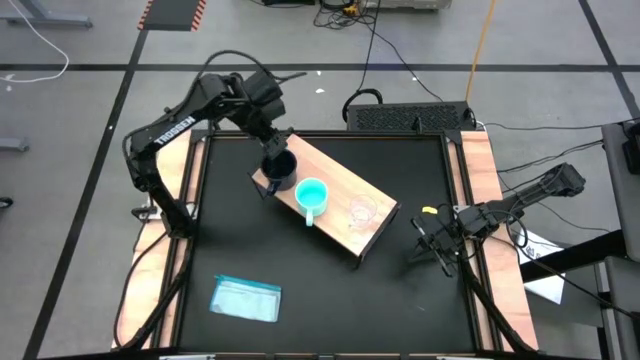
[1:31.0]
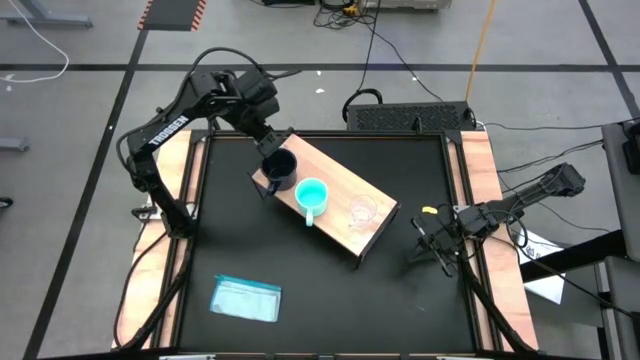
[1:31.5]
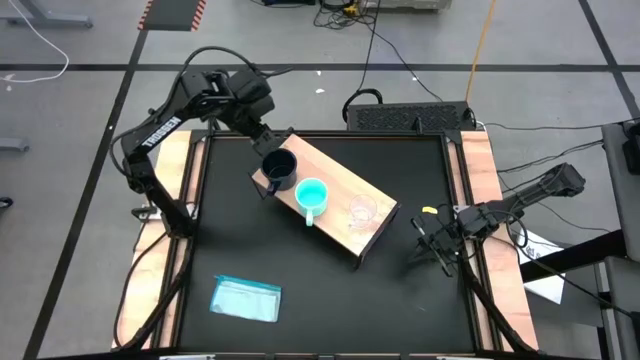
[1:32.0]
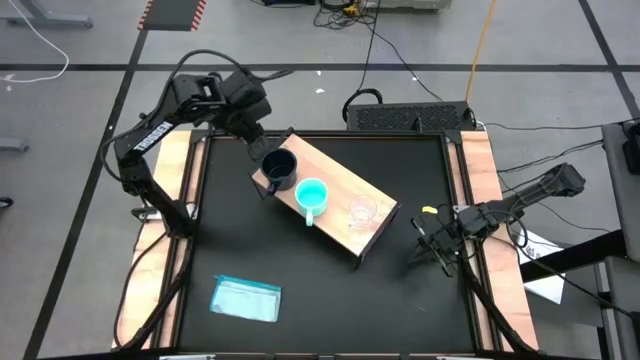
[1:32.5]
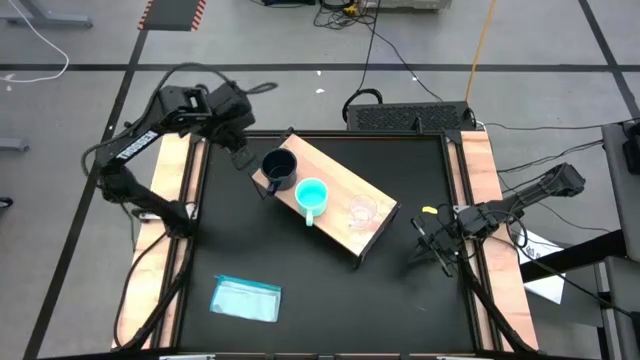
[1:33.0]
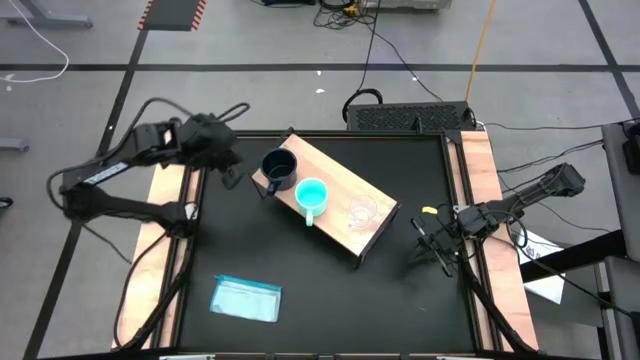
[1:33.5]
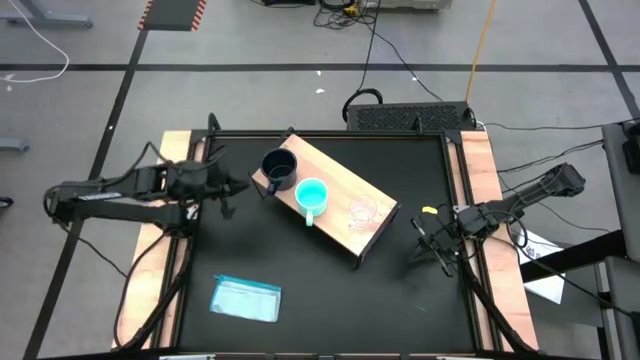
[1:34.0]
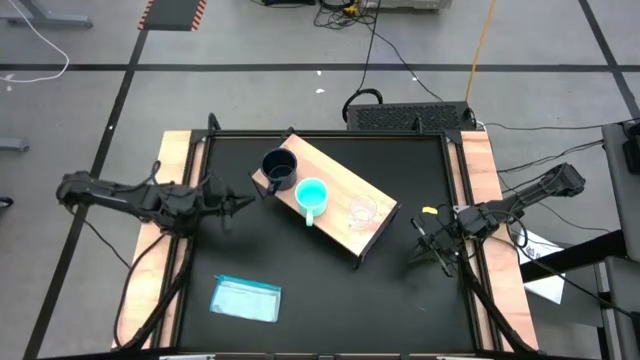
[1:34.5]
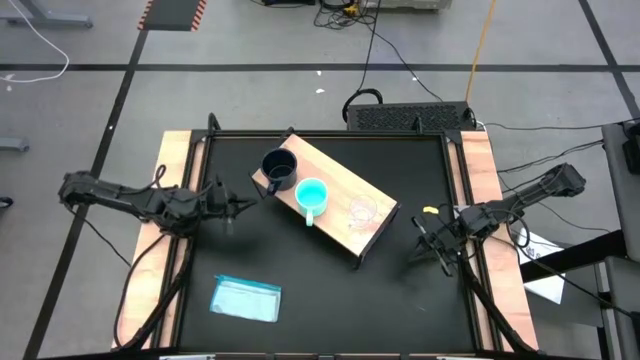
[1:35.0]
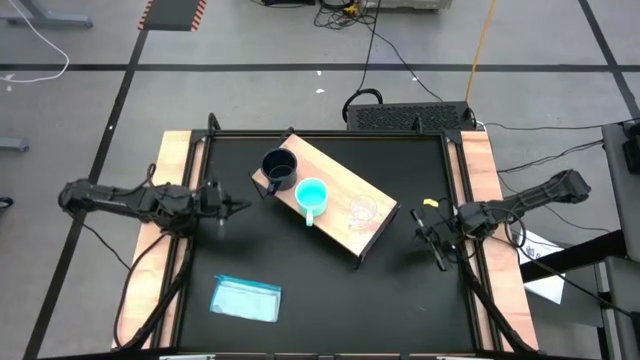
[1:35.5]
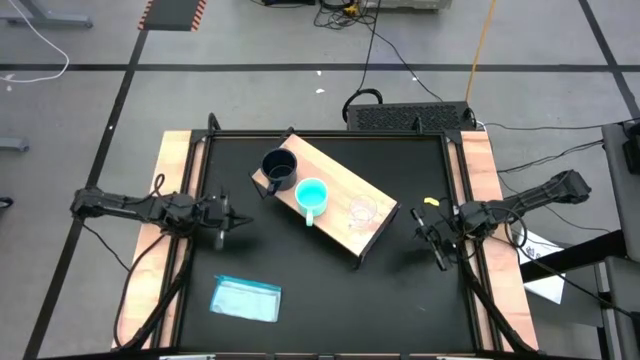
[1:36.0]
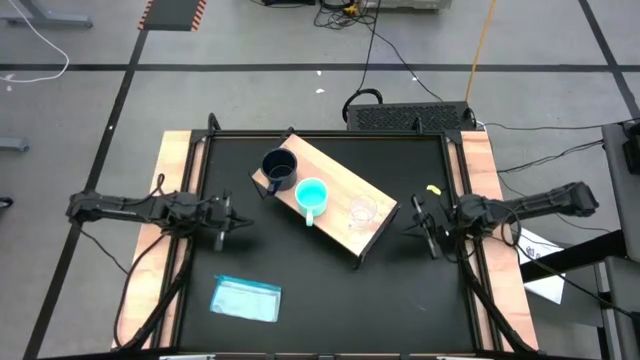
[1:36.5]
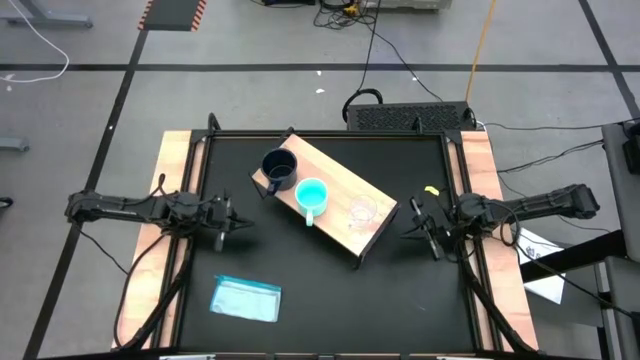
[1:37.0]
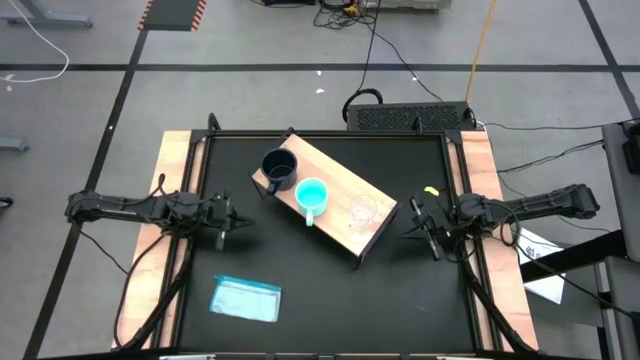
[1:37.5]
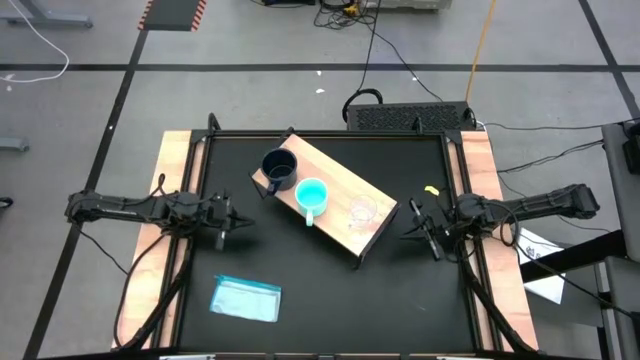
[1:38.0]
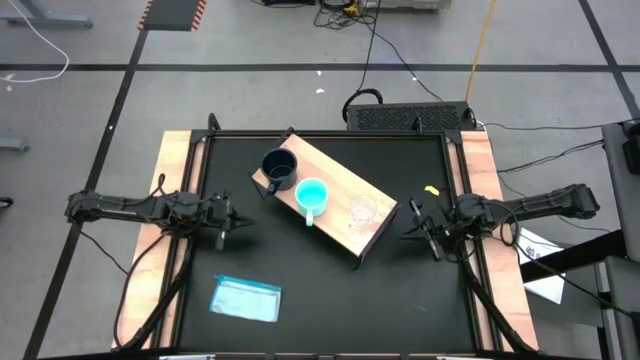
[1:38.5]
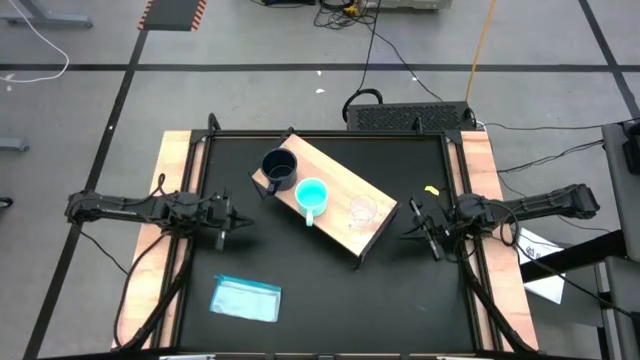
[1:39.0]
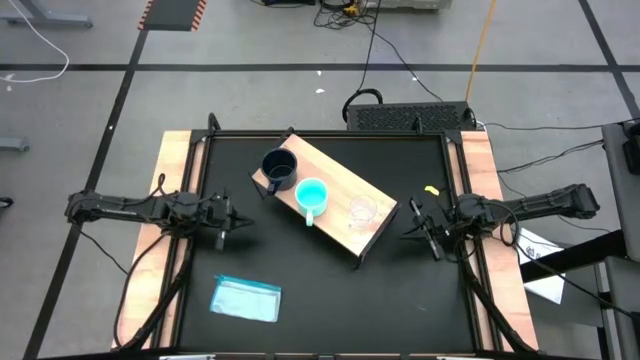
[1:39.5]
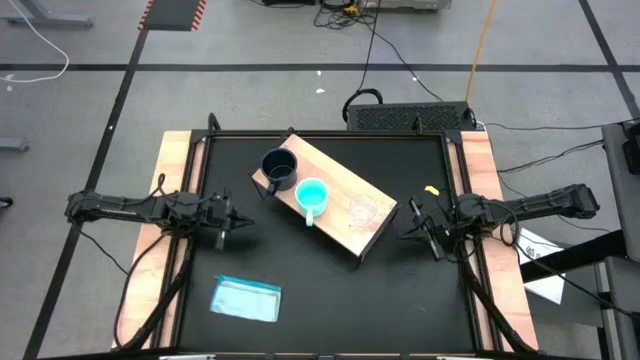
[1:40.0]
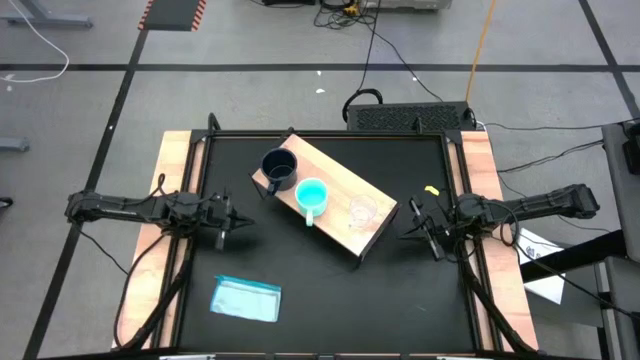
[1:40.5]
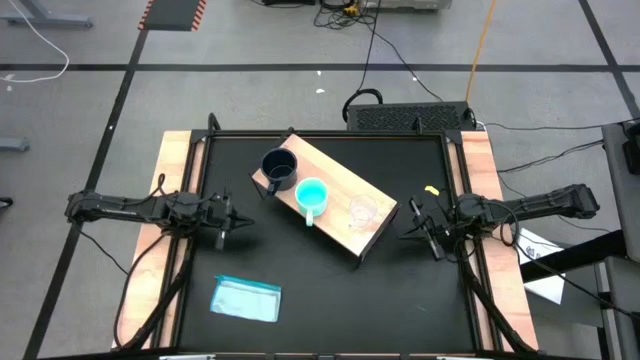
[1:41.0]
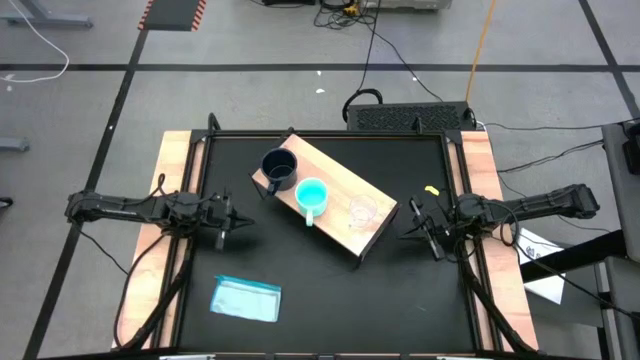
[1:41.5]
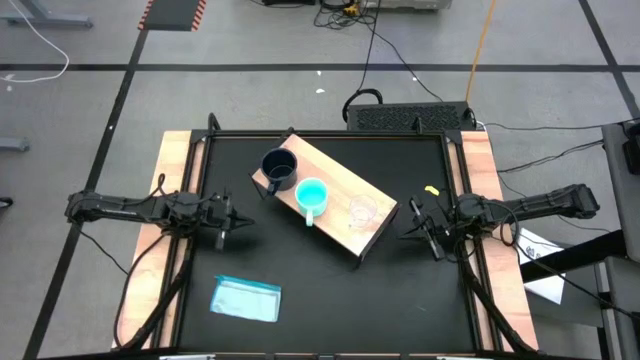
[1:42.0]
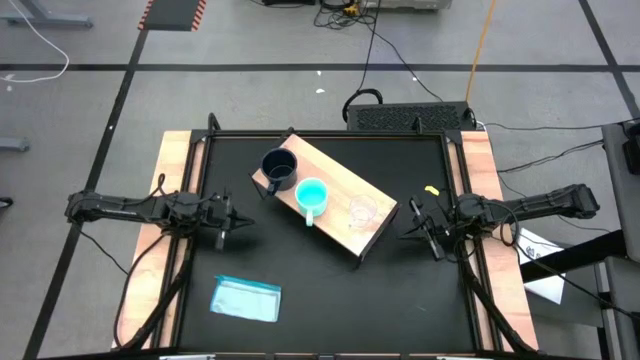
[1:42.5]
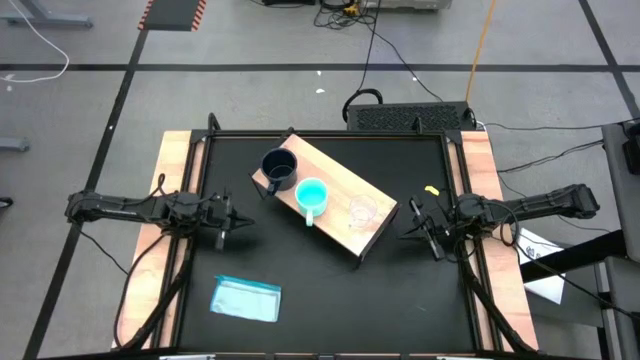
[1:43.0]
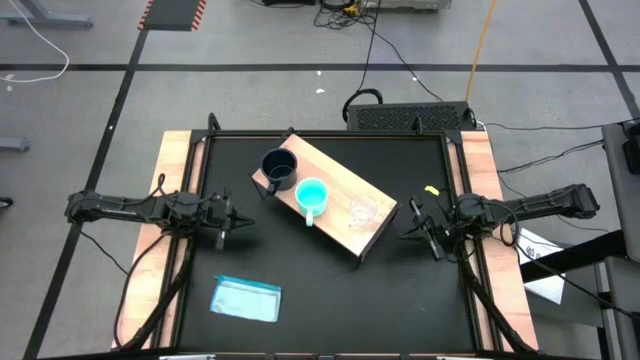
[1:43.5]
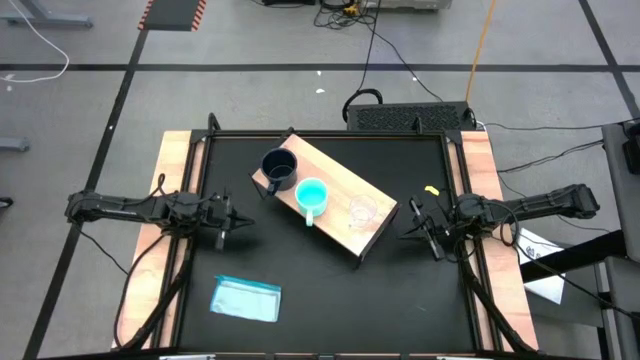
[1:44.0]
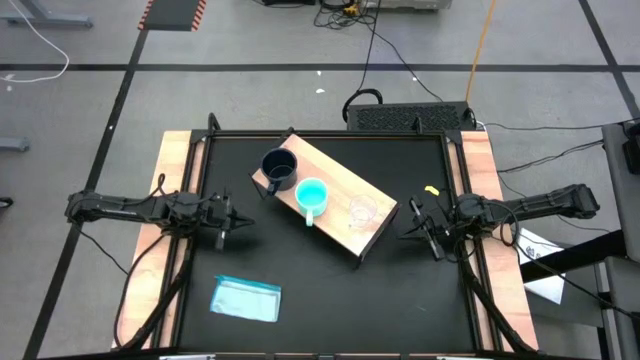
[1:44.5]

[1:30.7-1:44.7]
Task: Stack small to large cups/mugs on shelf
Return to Home Position

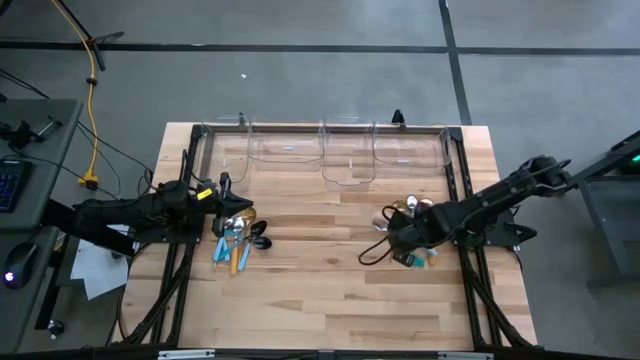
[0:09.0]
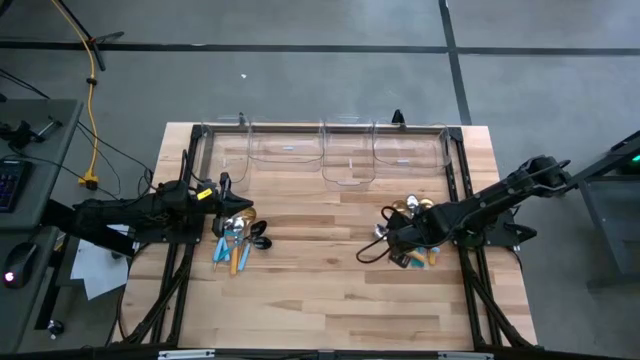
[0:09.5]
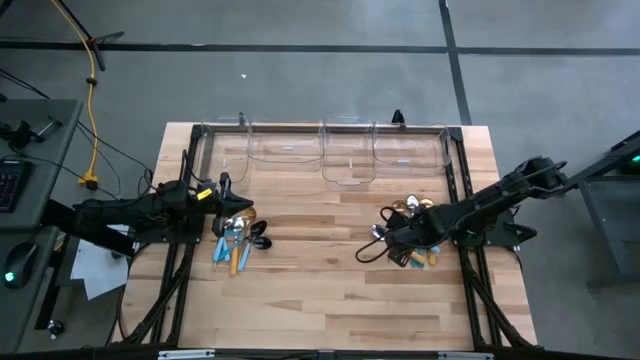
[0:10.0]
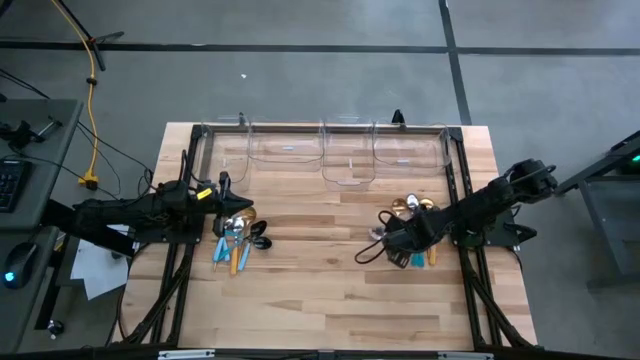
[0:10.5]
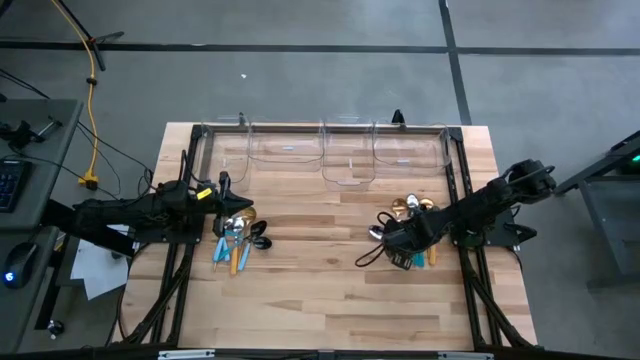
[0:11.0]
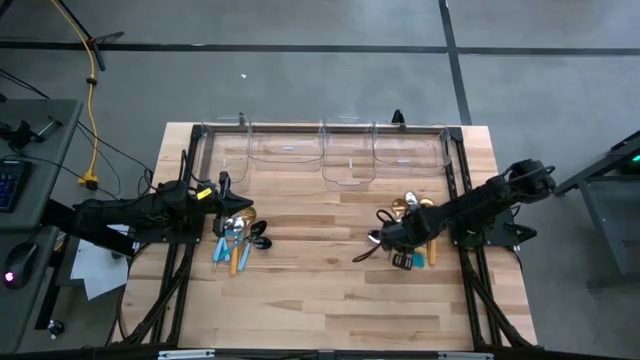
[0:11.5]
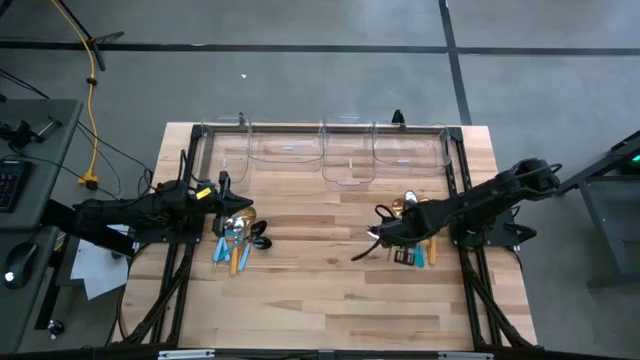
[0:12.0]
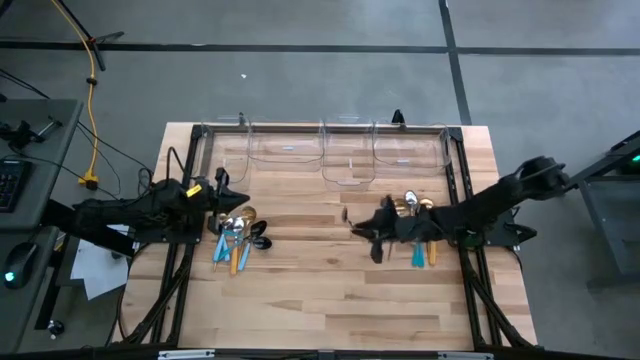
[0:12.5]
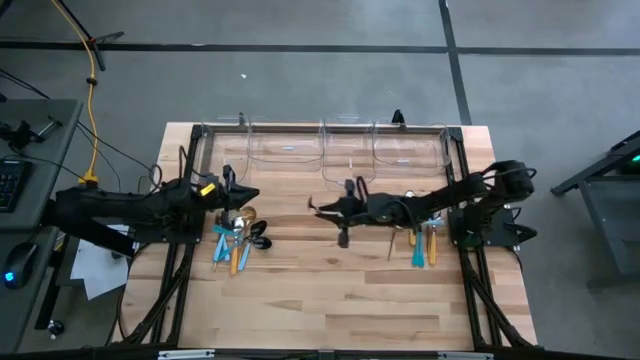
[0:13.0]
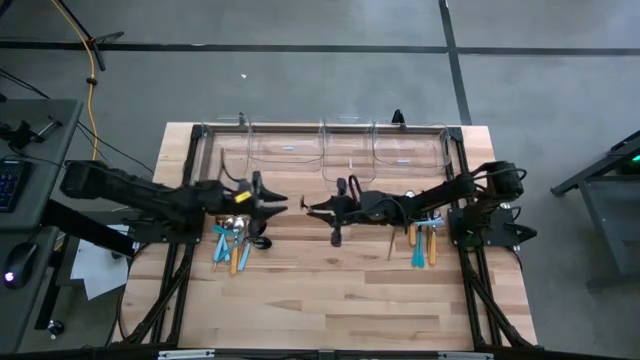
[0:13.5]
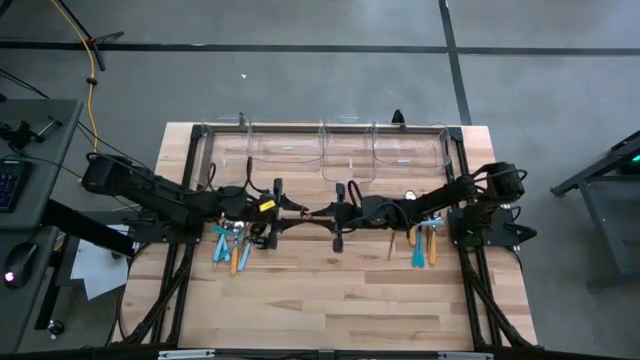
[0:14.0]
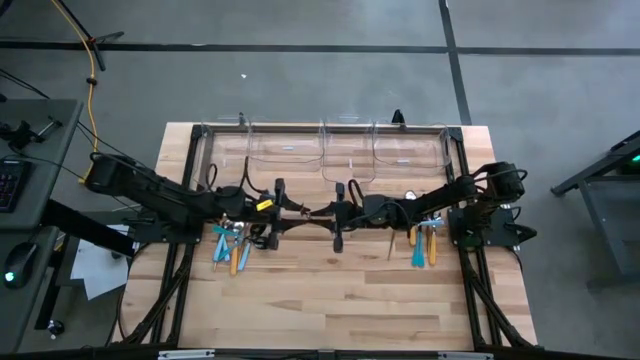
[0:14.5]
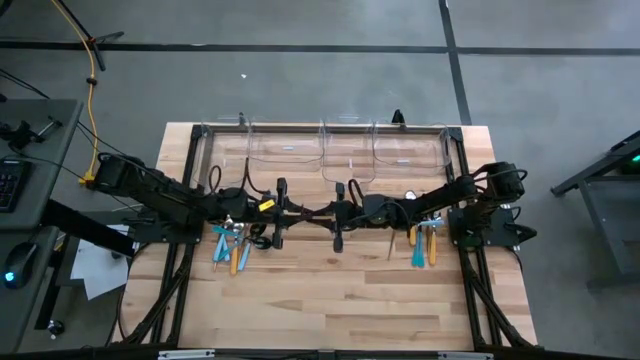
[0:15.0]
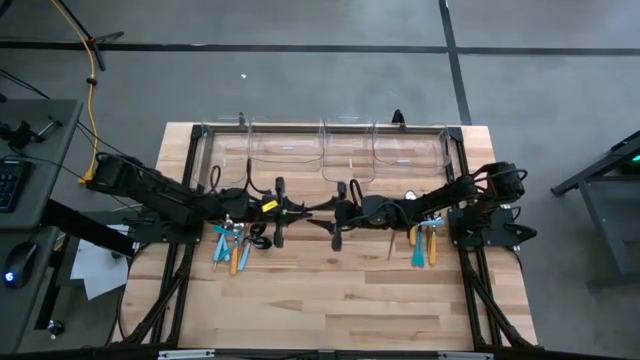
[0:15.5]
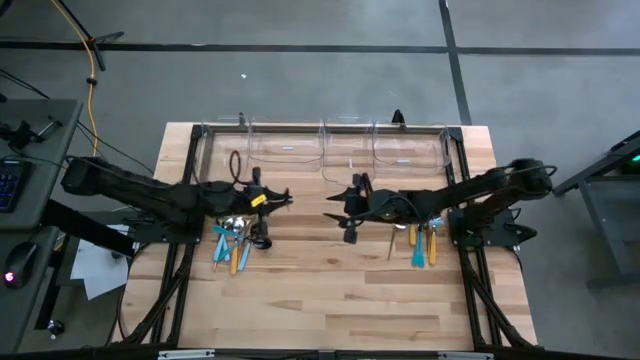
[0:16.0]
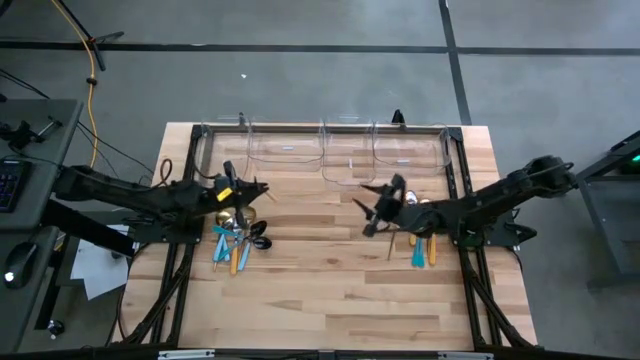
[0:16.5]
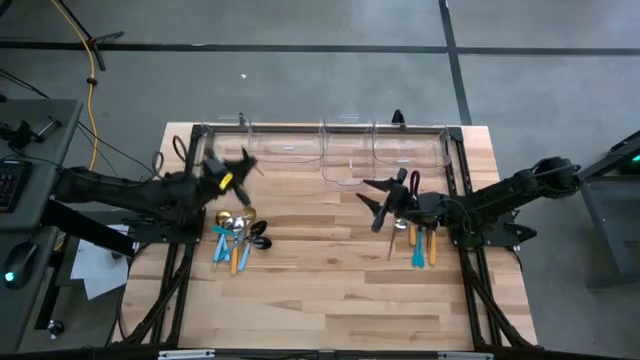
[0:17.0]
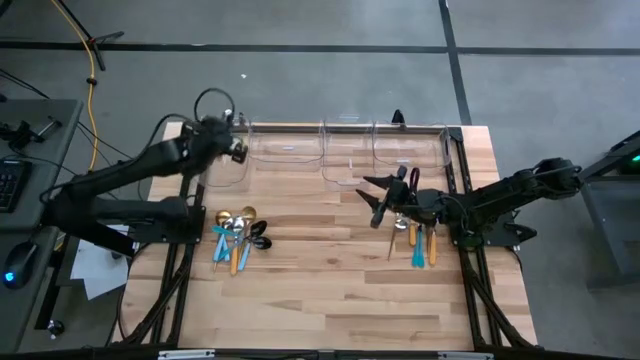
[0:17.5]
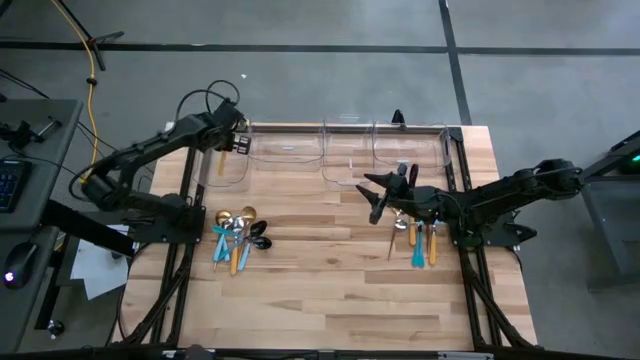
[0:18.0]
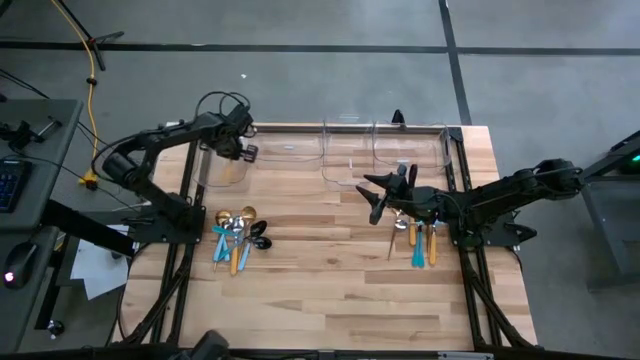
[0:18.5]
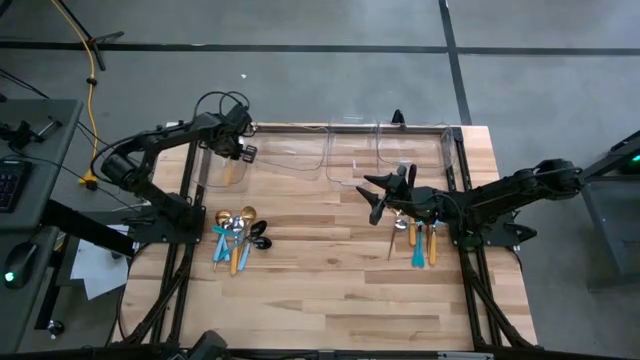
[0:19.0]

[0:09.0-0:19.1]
Task: Sort silverware by color (type)
Put the yellow spoon into the left transparent bin
